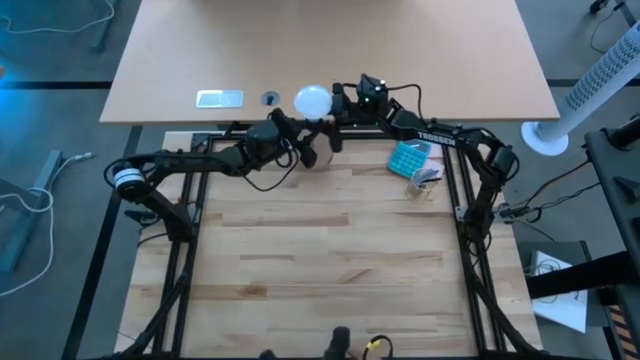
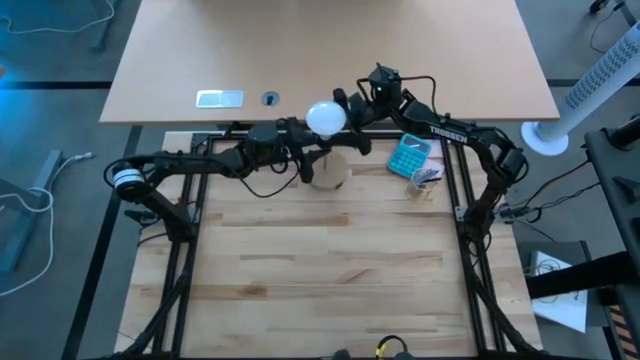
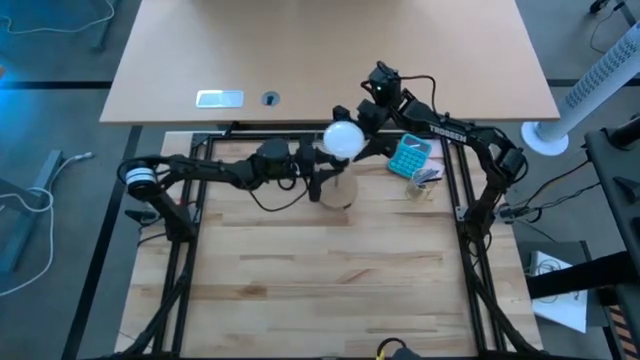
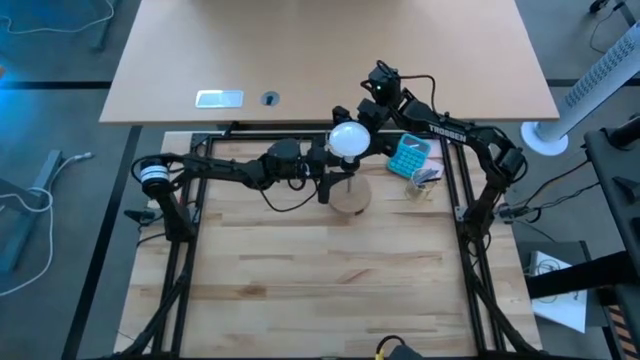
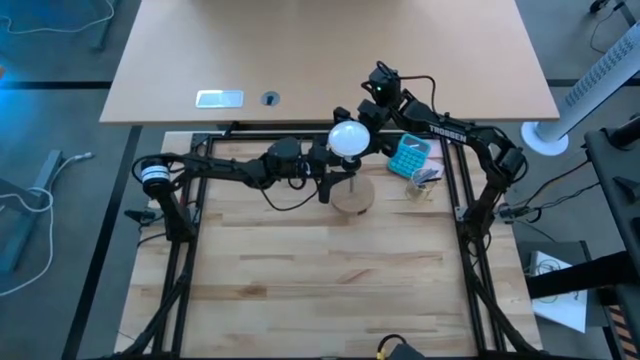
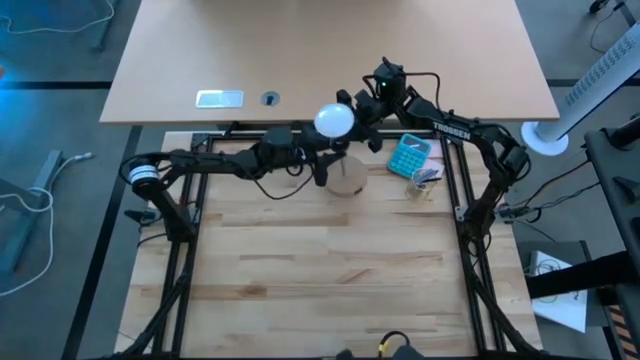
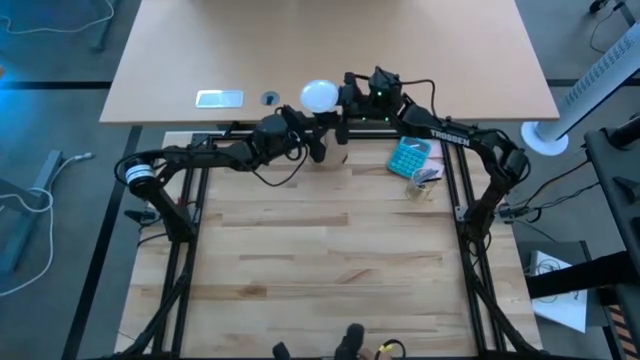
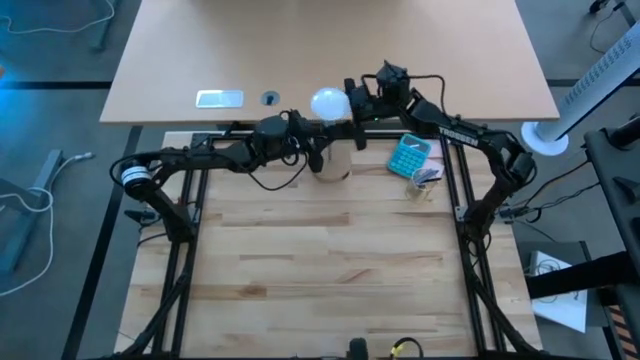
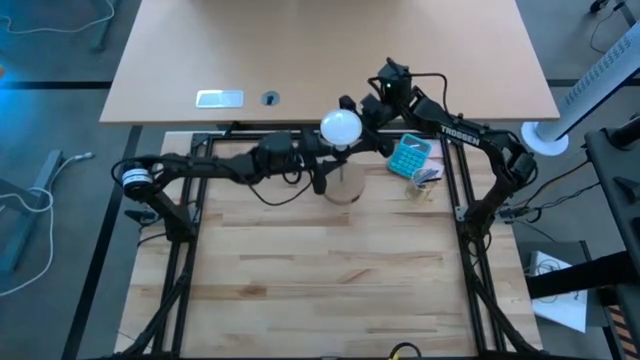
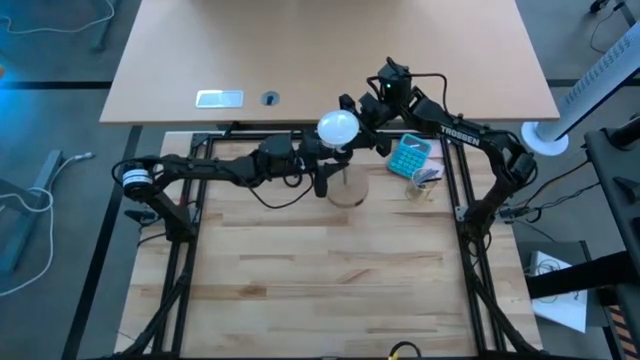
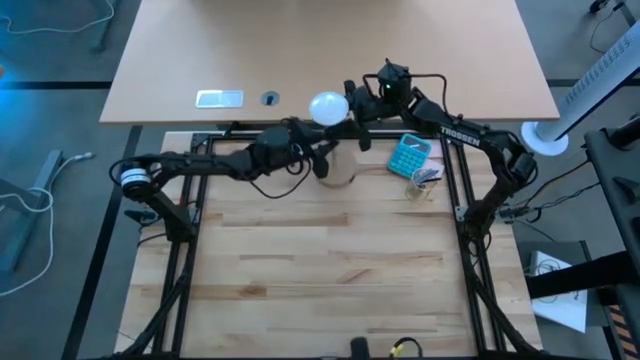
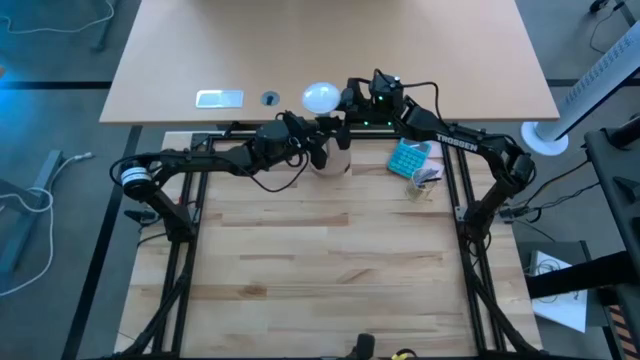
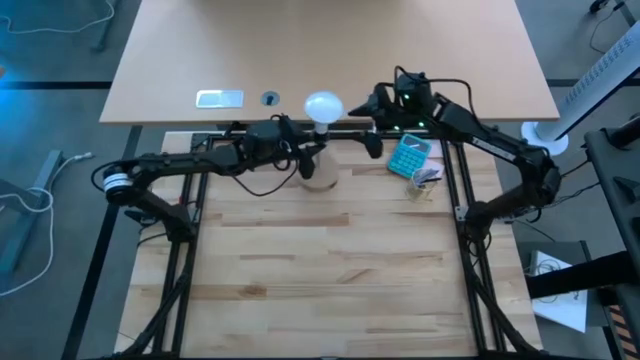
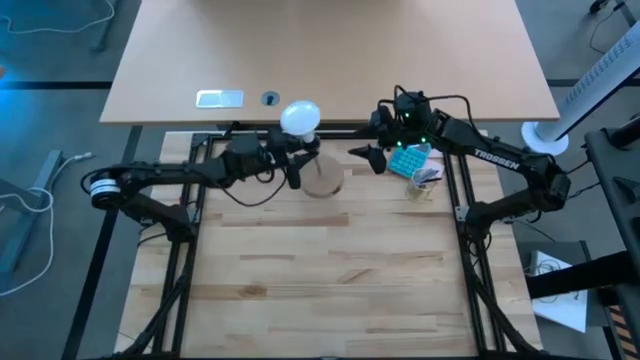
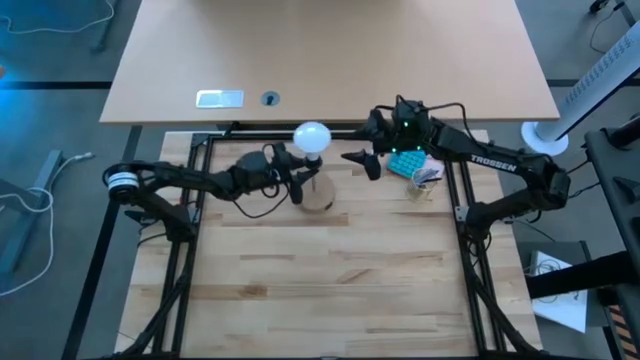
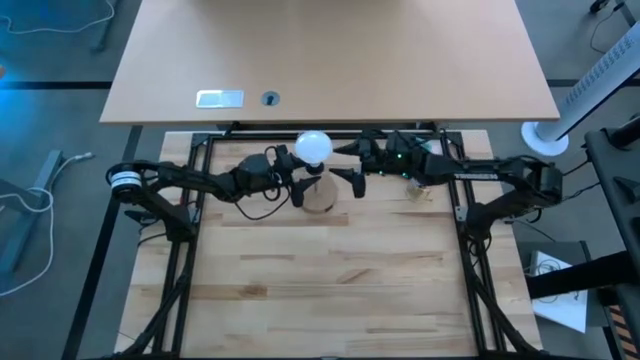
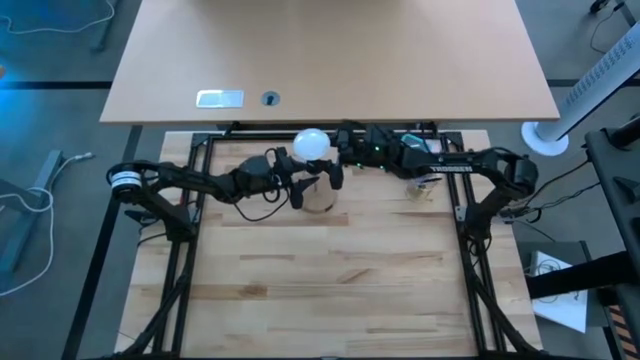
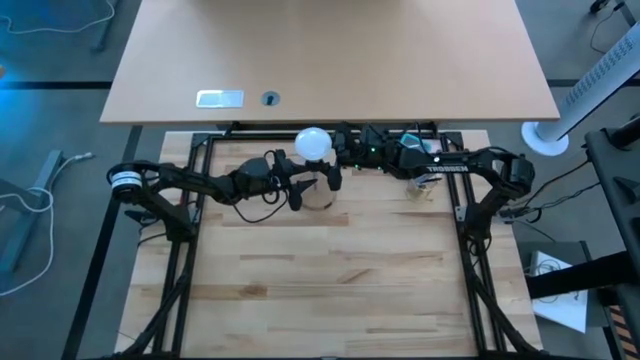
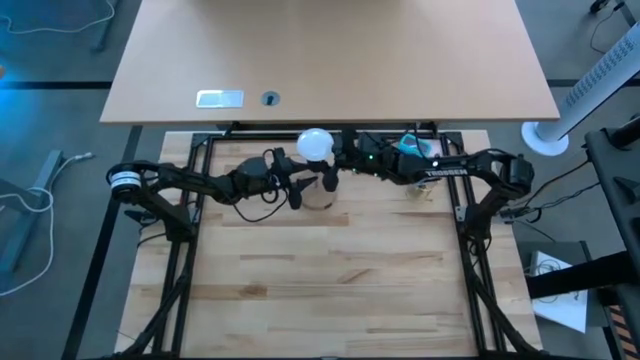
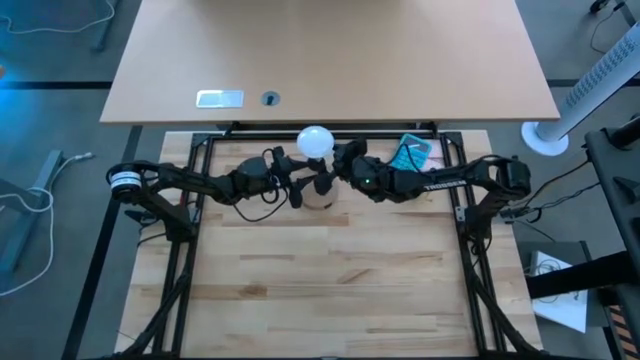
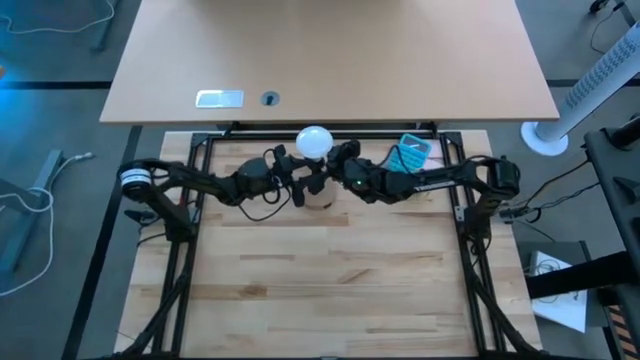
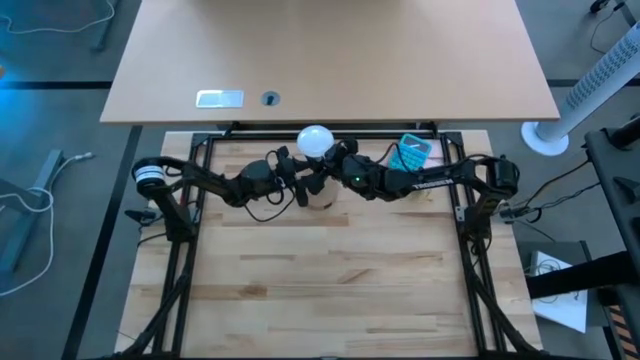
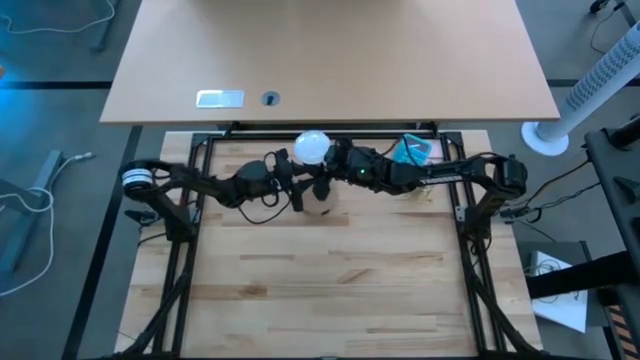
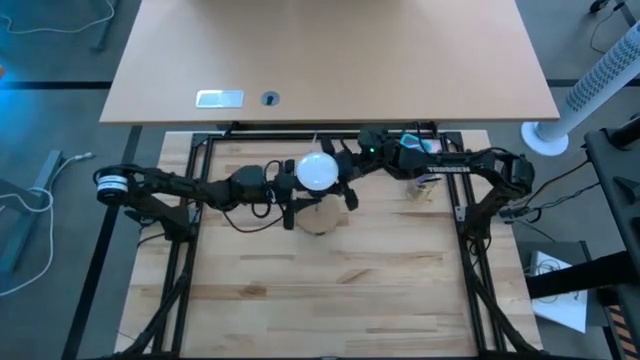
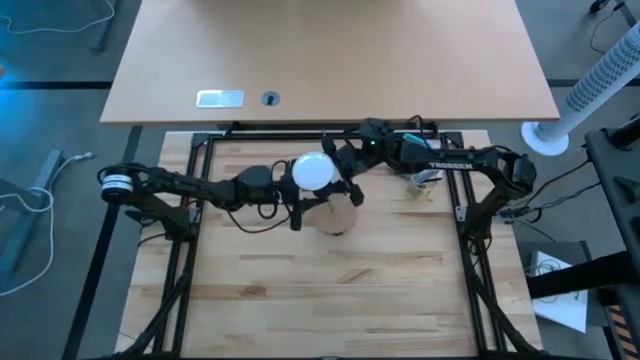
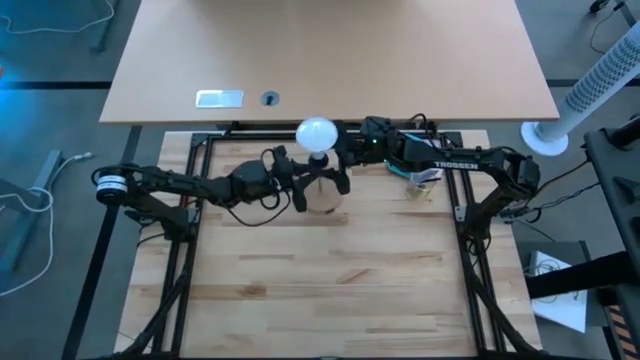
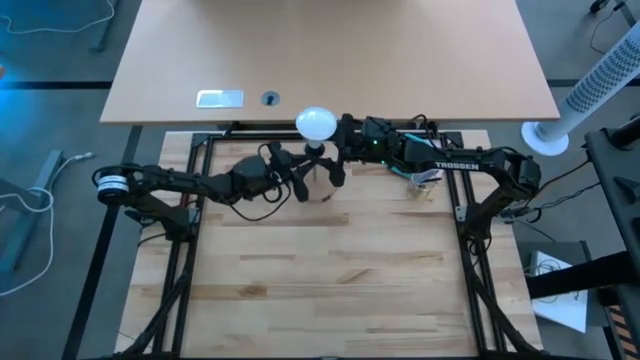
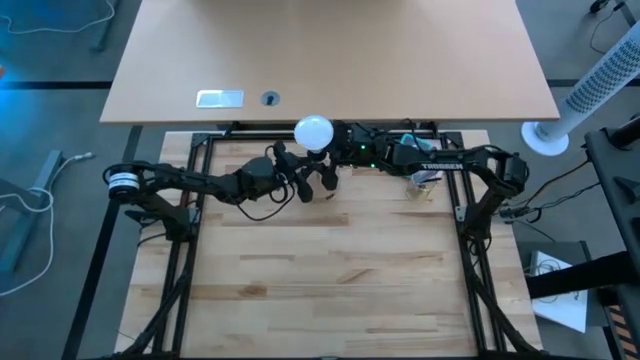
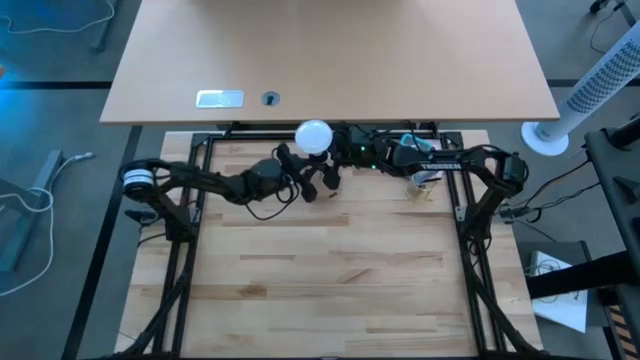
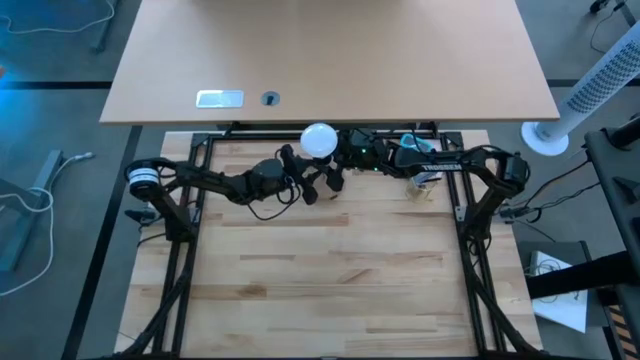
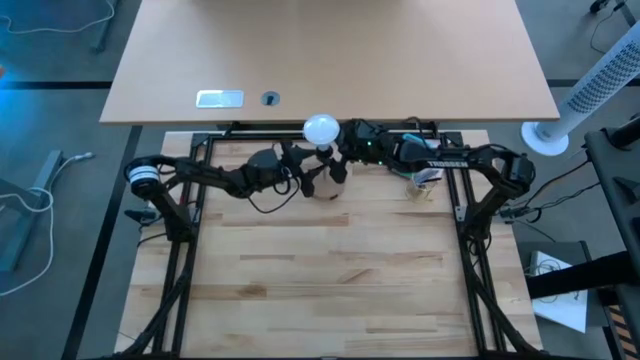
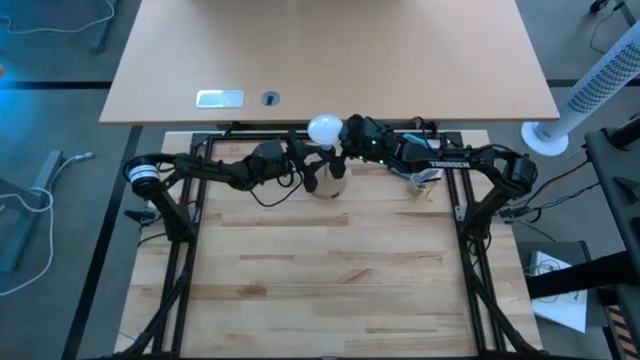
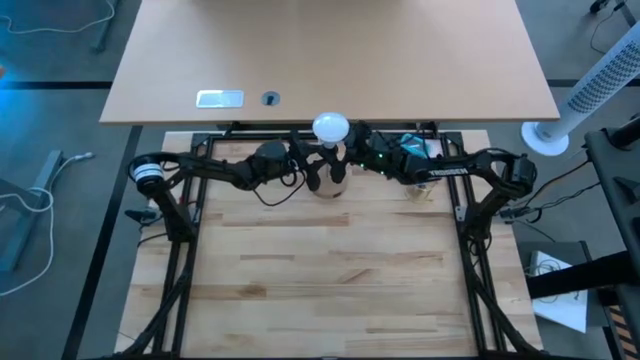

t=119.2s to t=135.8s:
Task: Screw lightbulb
Remove the light bulb from the table lamp

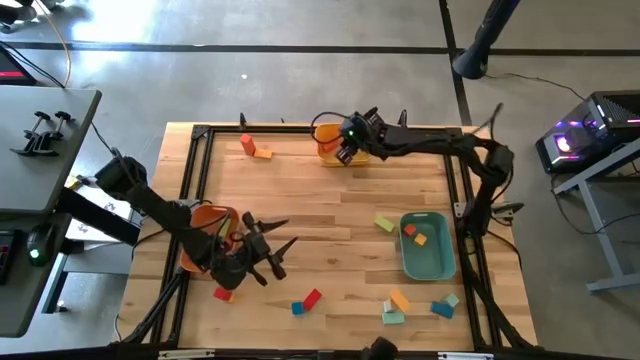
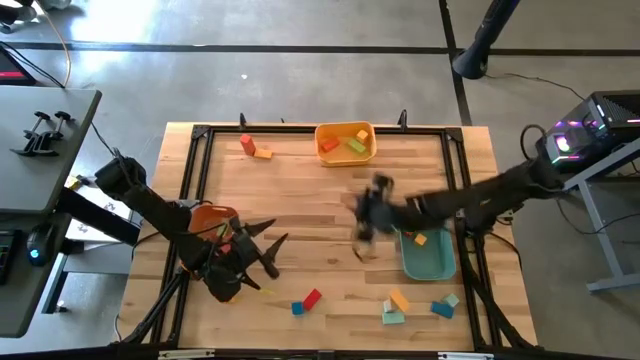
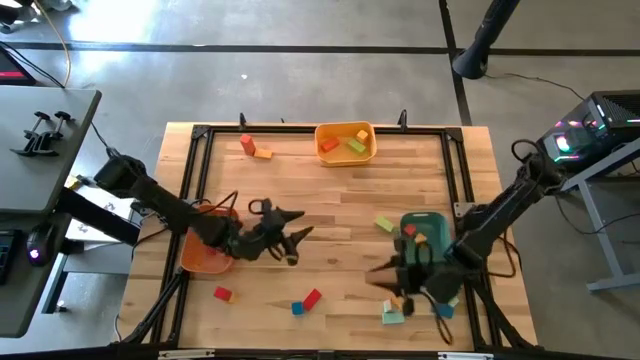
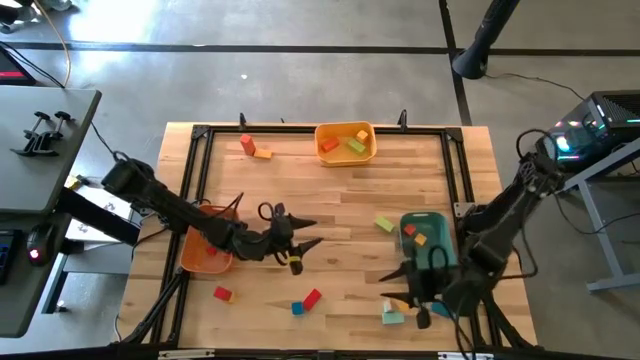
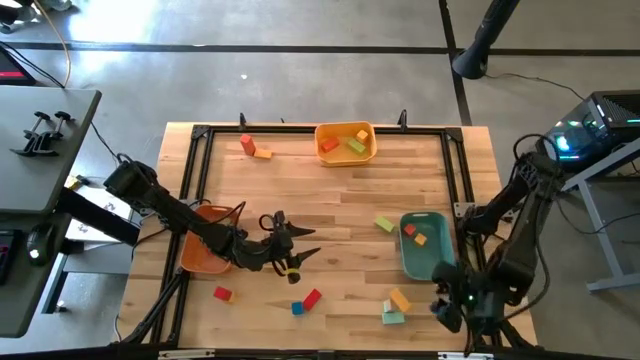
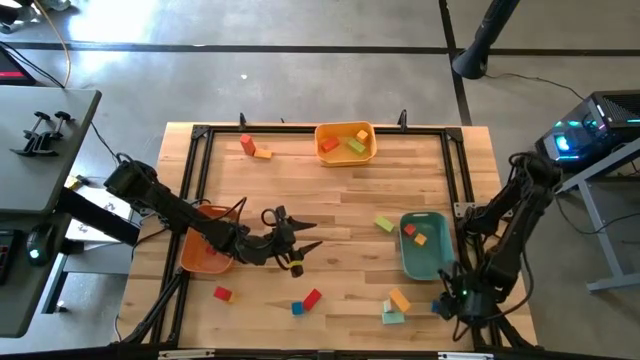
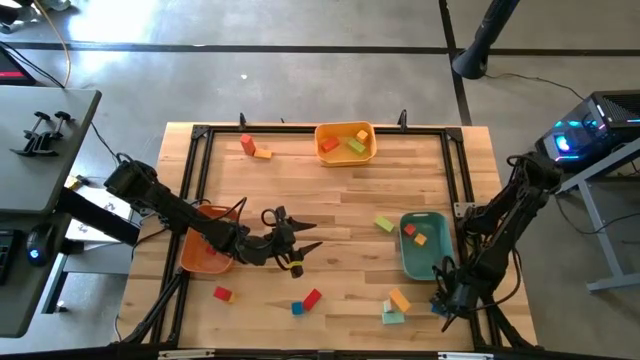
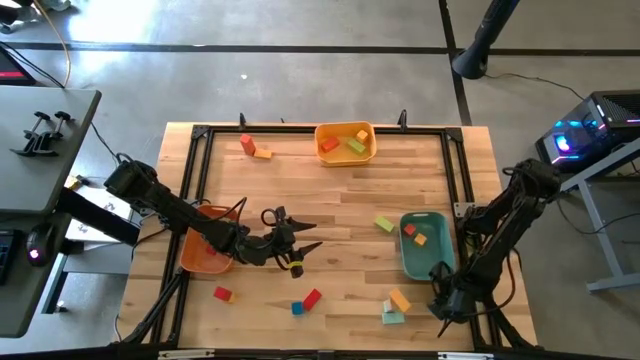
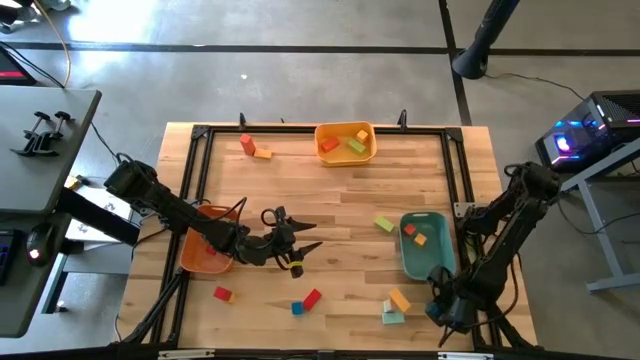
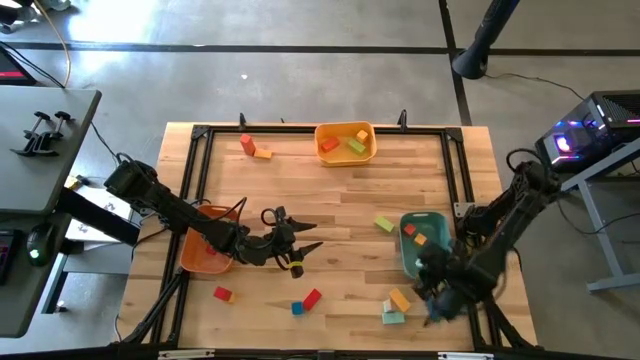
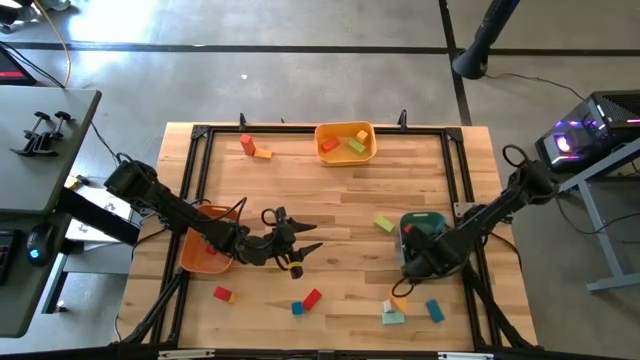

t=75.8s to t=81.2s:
Task: Sort blocks by size
Put the light blue small block into the green bin
